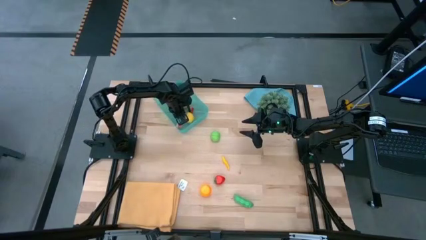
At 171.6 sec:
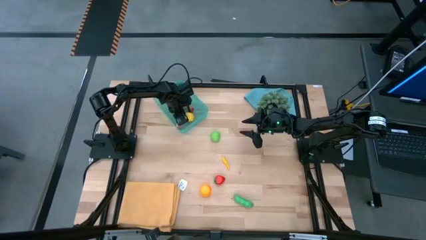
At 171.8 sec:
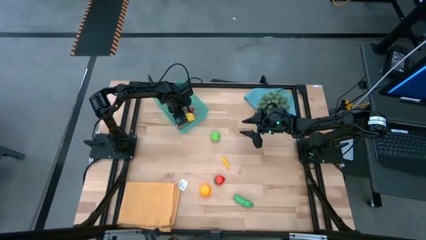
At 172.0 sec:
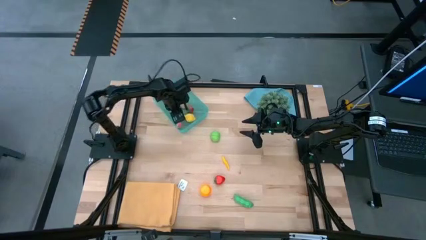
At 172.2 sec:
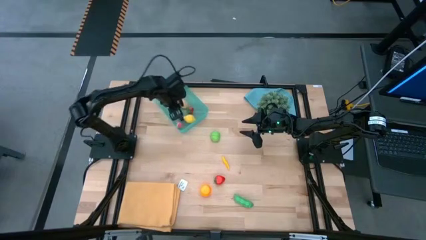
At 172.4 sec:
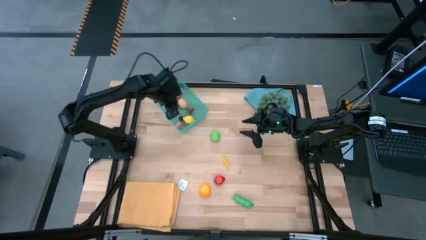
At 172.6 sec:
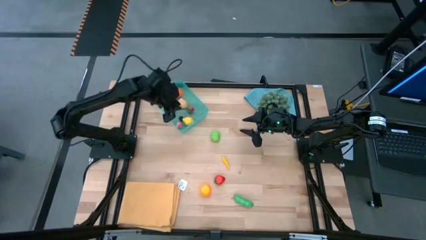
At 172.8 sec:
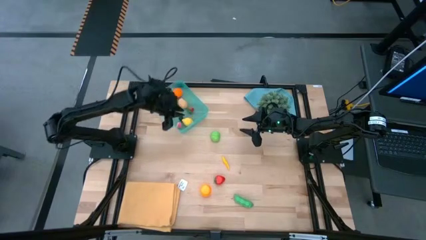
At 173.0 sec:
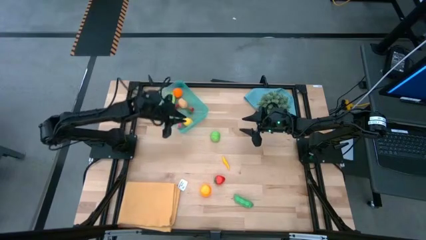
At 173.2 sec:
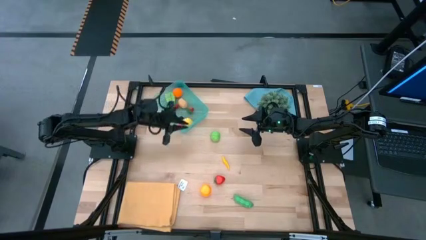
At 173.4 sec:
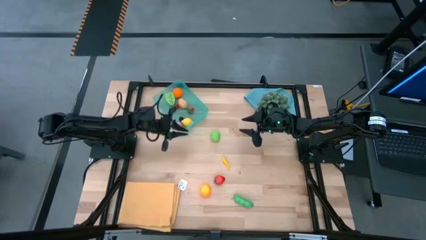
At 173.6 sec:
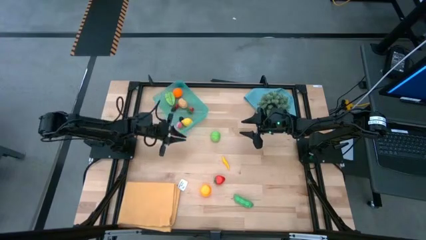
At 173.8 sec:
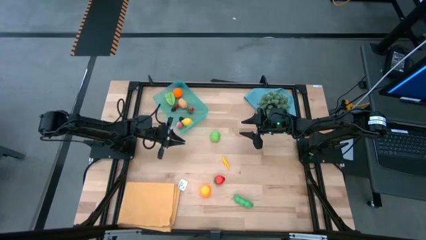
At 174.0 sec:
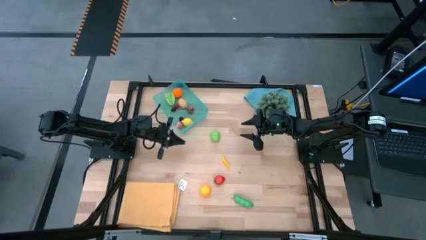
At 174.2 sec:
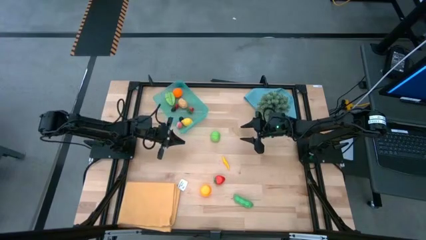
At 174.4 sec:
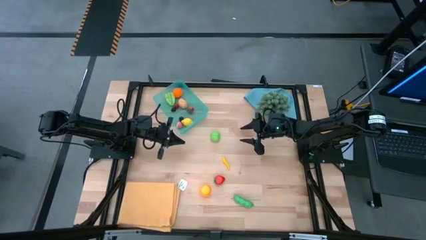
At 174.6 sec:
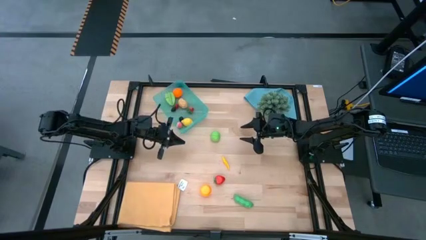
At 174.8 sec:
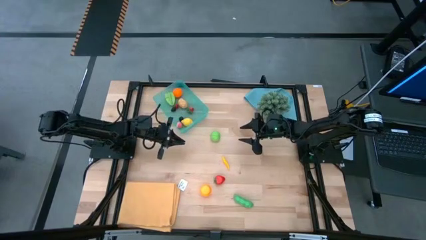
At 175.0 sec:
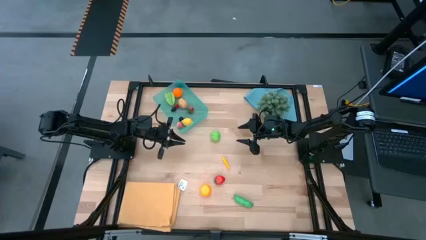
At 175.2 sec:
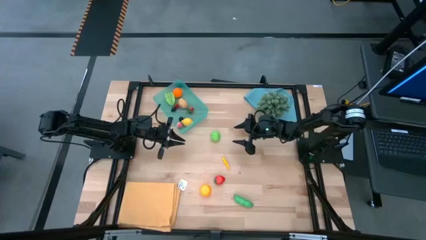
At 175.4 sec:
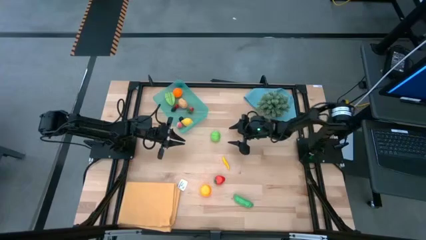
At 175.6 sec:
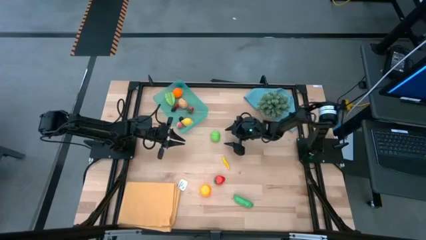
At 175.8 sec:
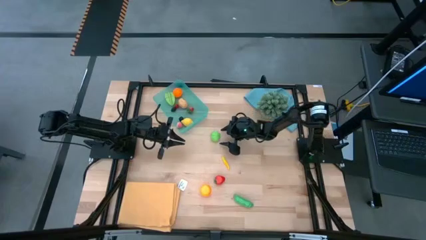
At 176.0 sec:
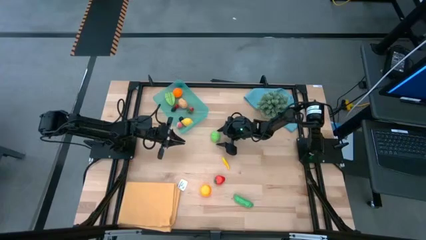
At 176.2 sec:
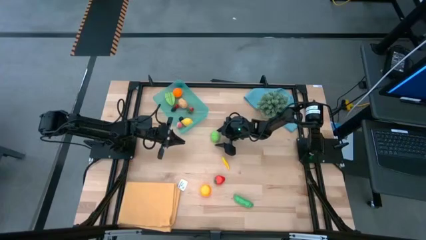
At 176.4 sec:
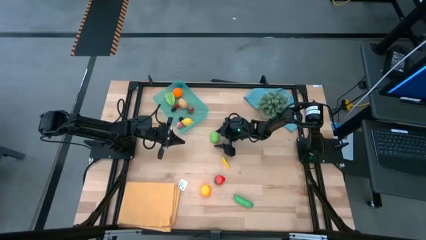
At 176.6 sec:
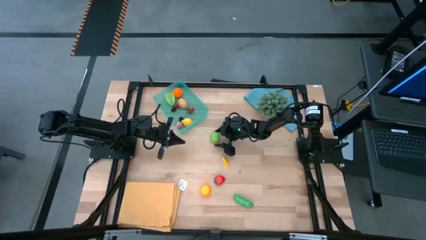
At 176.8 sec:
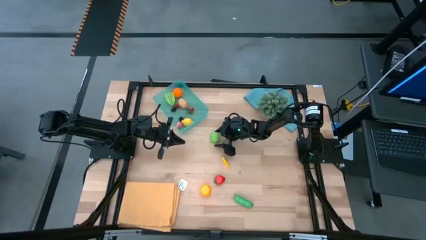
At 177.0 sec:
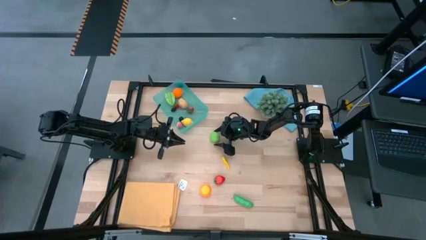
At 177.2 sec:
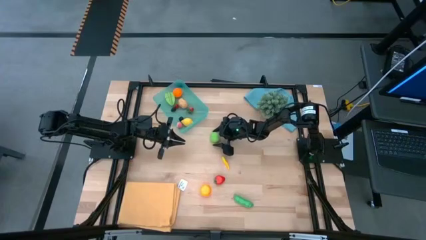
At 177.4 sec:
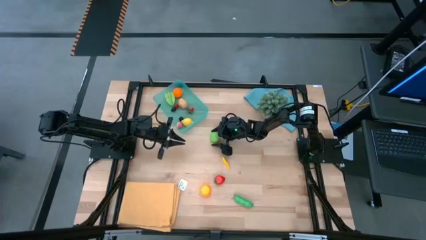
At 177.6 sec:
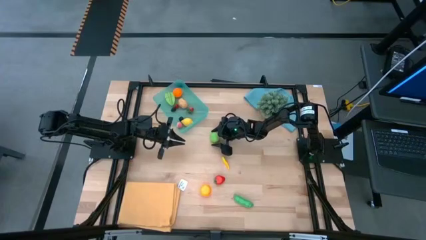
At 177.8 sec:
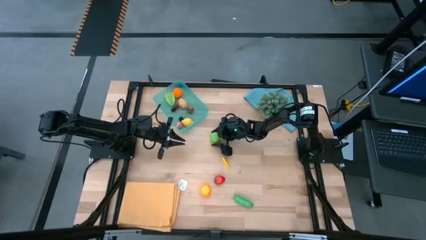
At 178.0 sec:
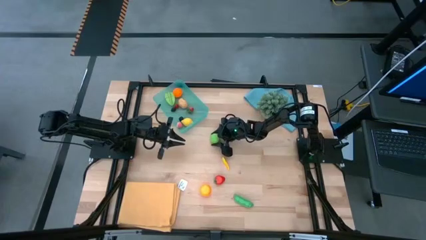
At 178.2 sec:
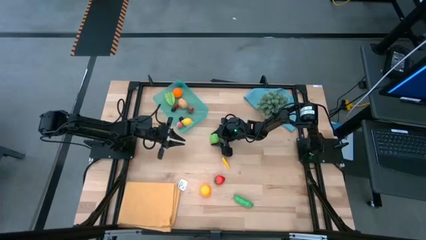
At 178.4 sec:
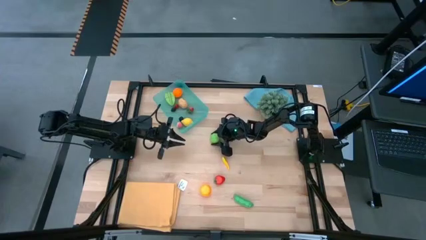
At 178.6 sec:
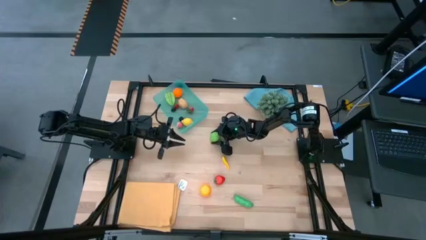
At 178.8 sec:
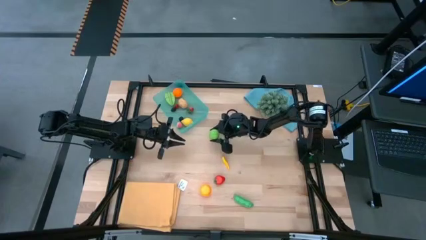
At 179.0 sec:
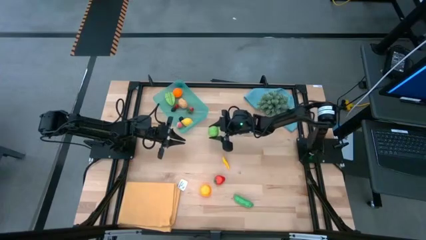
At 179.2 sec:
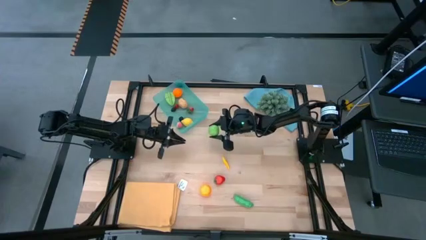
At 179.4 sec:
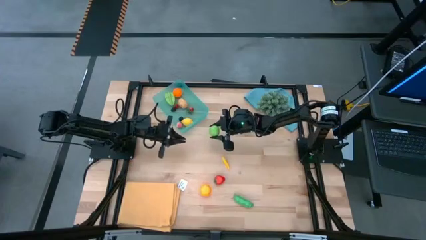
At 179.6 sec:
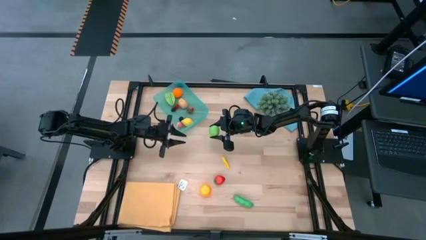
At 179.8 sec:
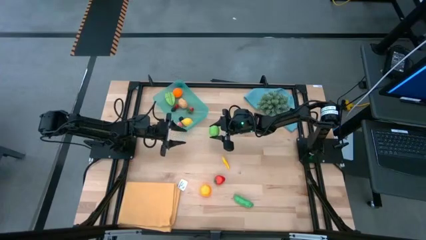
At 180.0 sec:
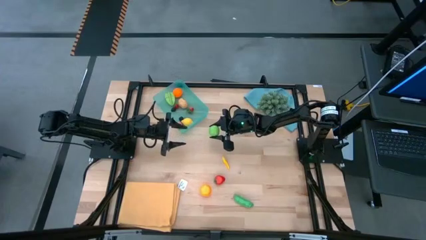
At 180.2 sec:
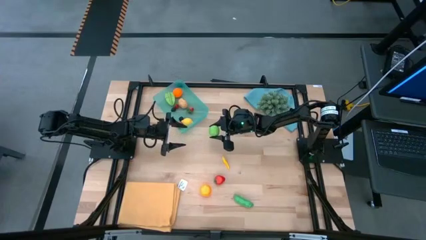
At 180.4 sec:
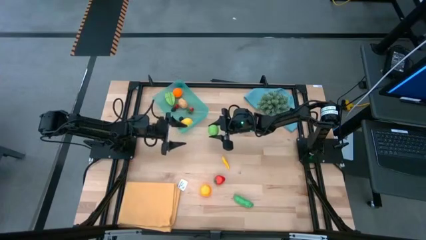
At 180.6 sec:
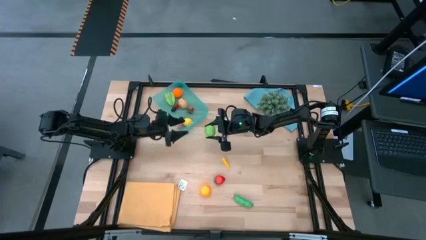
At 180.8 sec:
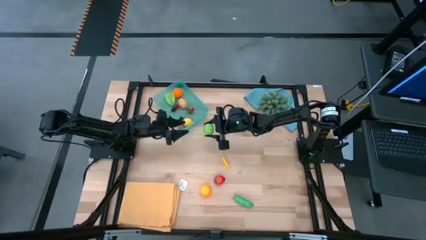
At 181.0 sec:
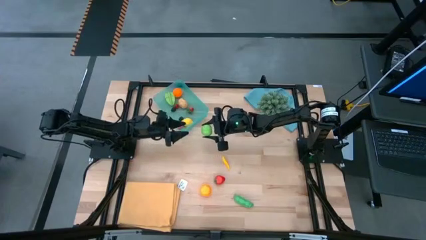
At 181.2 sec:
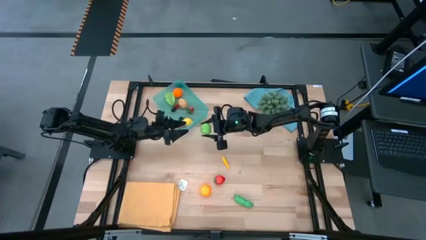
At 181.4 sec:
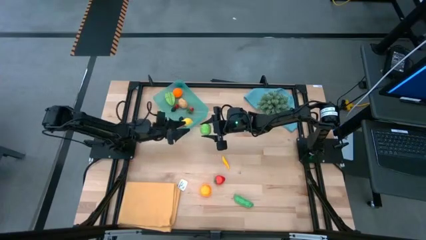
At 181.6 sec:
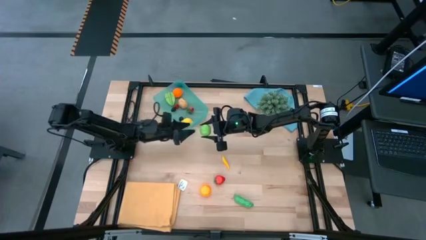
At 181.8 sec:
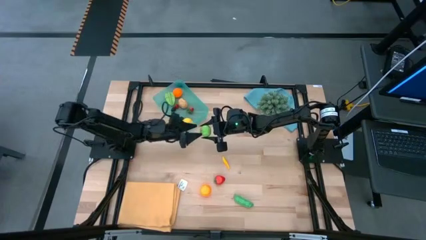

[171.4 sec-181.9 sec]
Task: Pick and placing Produce into tupperware
Put the green cabbage into the blue bin

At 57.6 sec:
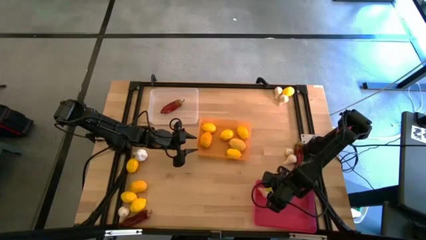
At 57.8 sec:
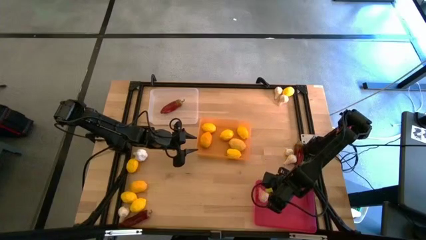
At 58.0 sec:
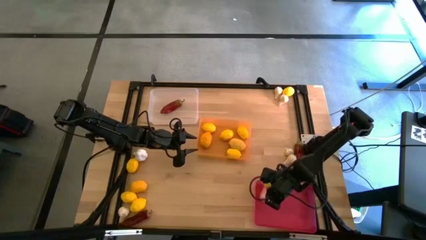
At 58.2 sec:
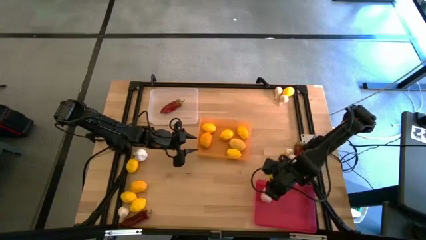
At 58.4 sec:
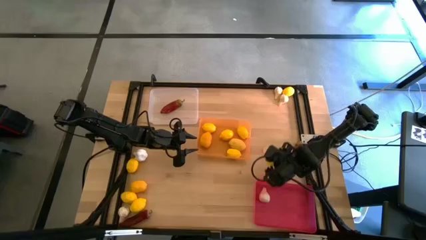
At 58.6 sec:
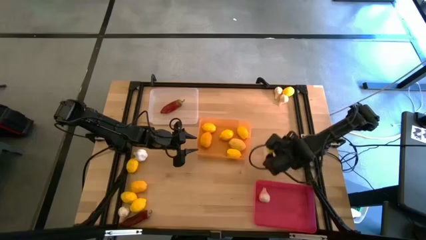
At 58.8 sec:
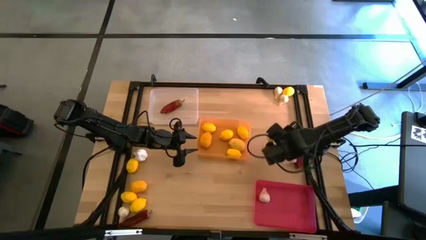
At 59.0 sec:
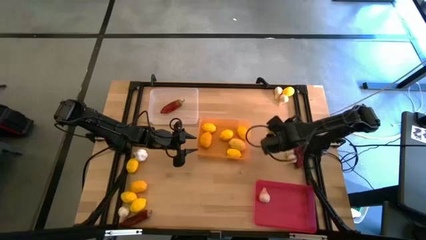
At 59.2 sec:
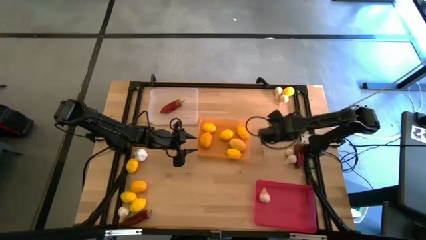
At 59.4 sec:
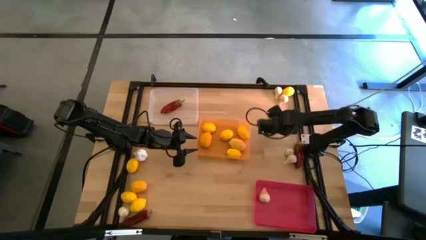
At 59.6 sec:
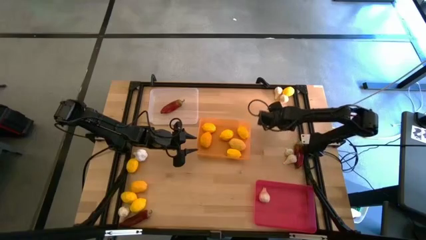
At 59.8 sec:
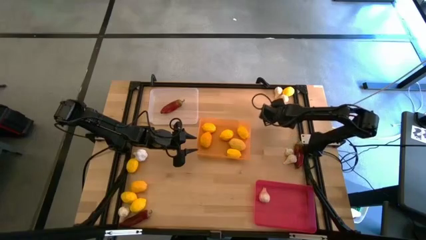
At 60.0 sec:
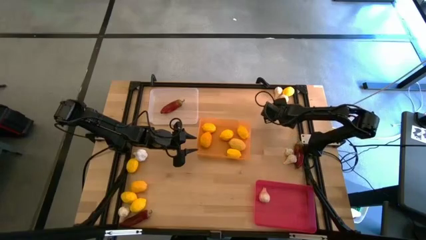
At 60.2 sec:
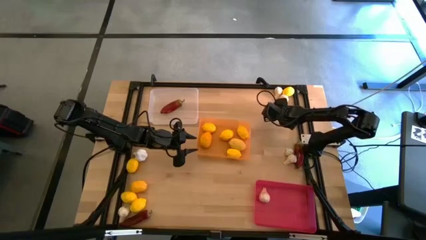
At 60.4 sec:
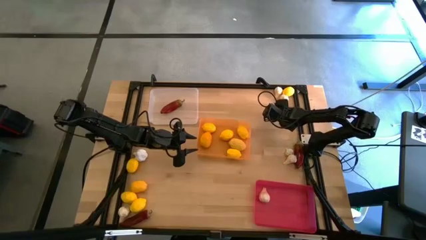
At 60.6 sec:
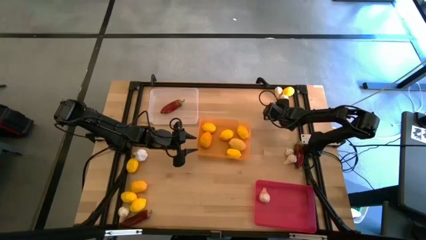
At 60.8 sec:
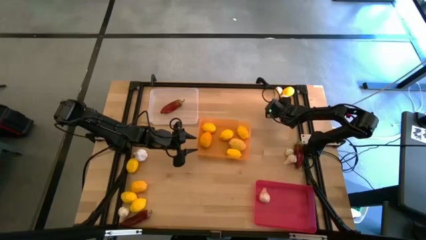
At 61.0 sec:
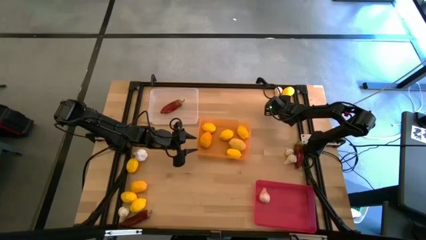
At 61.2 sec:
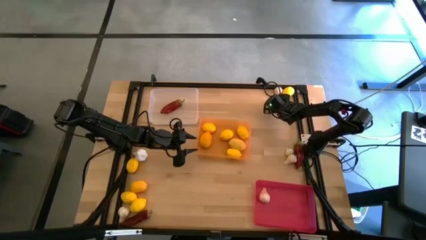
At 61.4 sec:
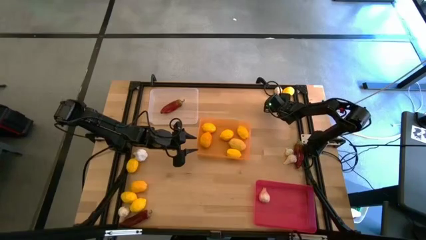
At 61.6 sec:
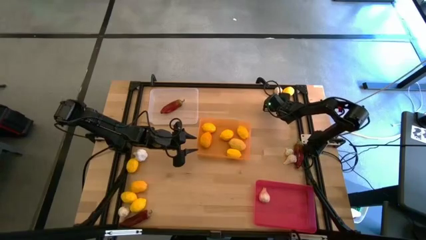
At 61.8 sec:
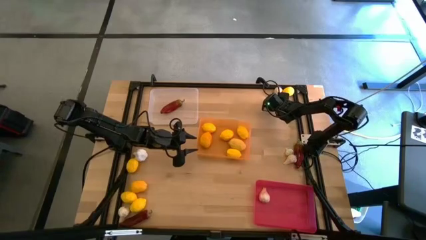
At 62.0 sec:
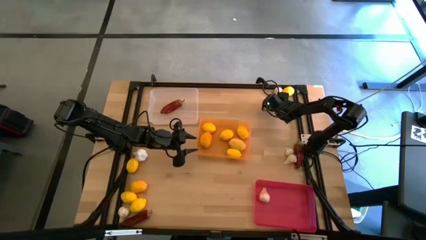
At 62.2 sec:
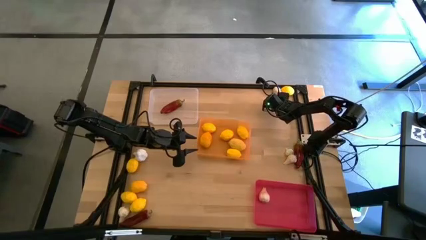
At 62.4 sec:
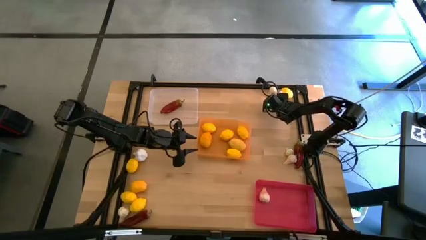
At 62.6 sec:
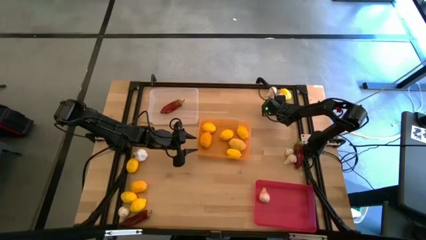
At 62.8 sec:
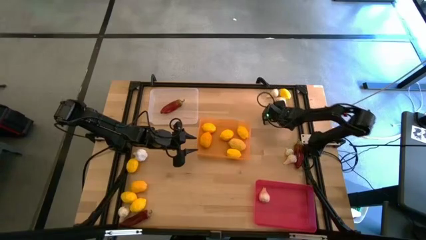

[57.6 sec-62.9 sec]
Task: Sort produce into baskets
Put the garlic into the red bin

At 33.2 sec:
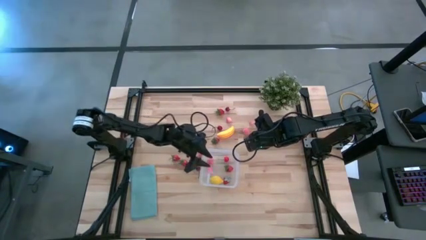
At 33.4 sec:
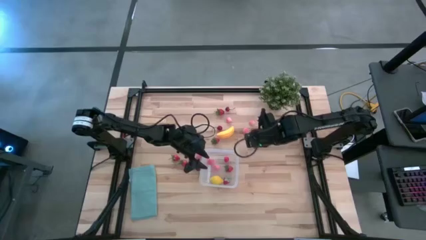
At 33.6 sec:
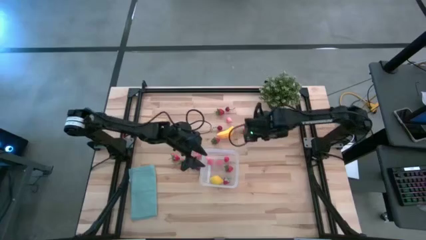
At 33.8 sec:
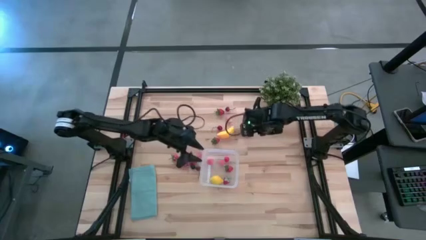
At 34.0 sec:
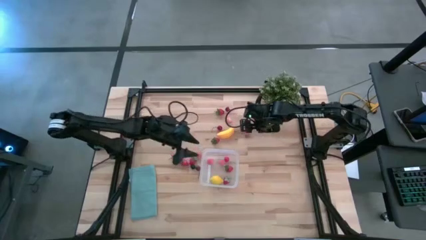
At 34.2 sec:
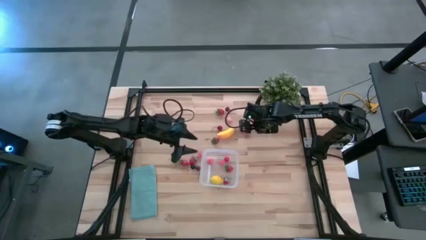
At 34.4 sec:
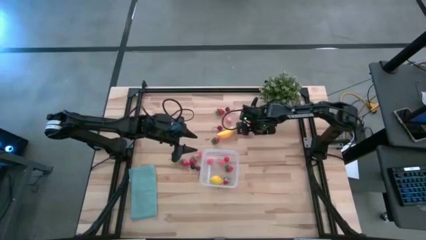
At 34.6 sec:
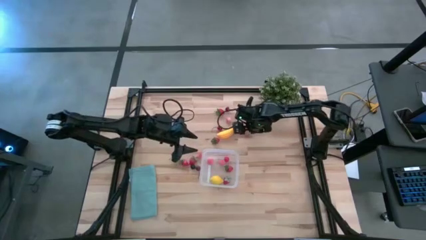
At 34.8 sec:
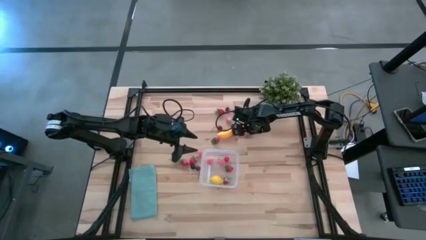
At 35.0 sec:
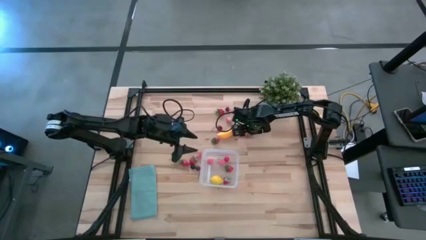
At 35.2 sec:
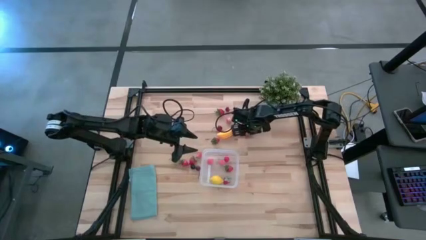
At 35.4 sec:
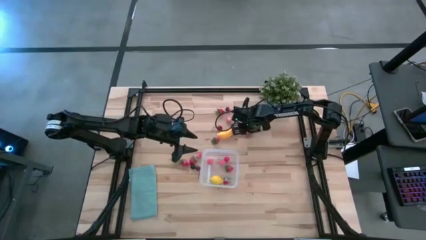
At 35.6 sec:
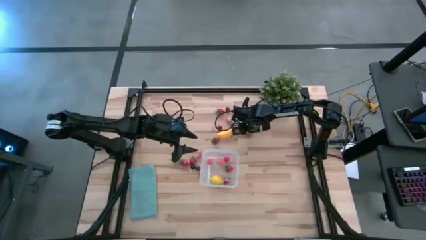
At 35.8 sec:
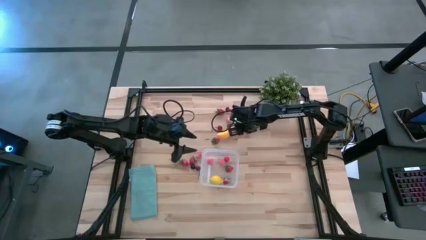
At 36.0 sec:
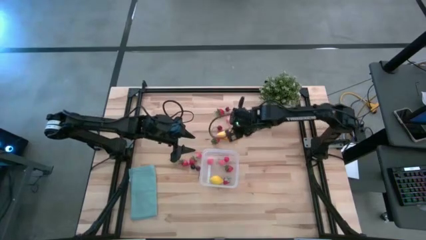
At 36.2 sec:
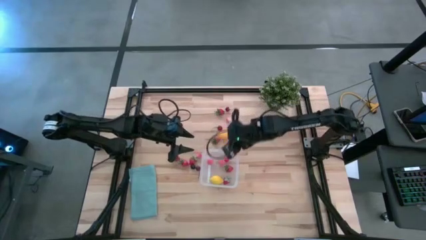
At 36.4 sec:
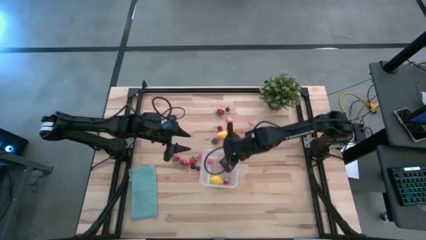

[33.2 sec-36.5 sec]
Task: Pick and placing Produce into tupperware
Put the pink peach into the transparent container
